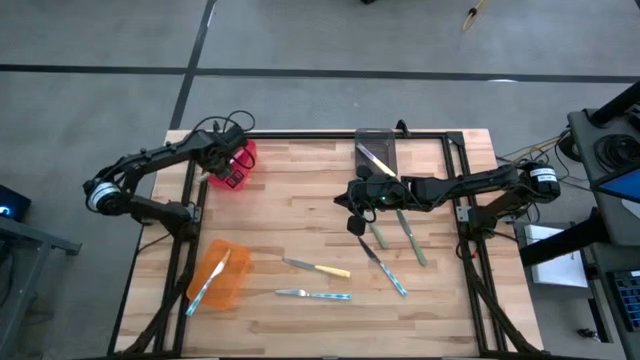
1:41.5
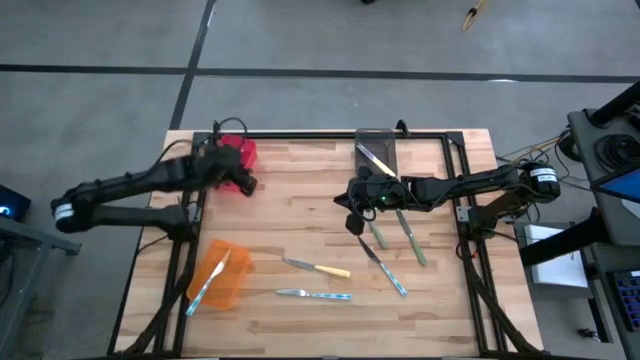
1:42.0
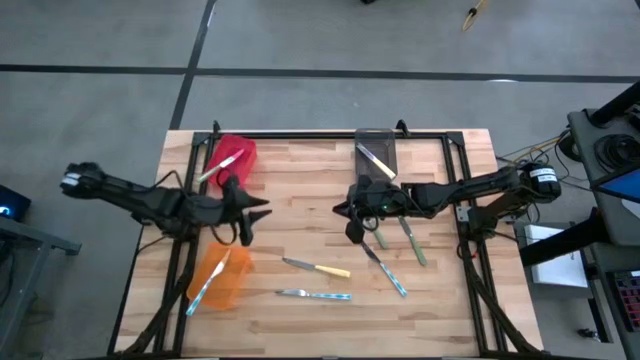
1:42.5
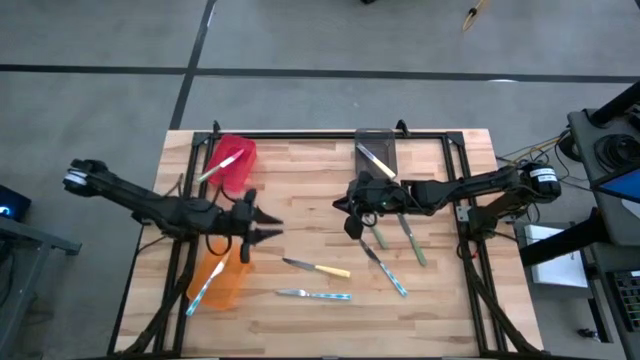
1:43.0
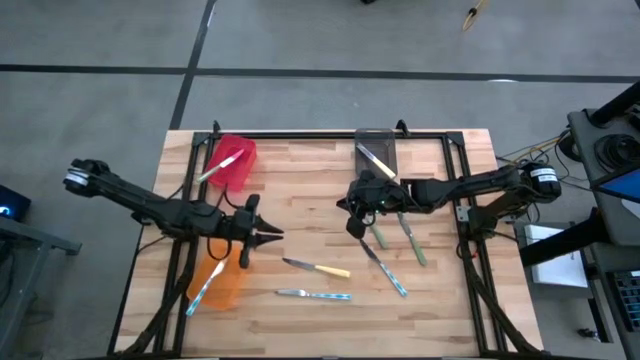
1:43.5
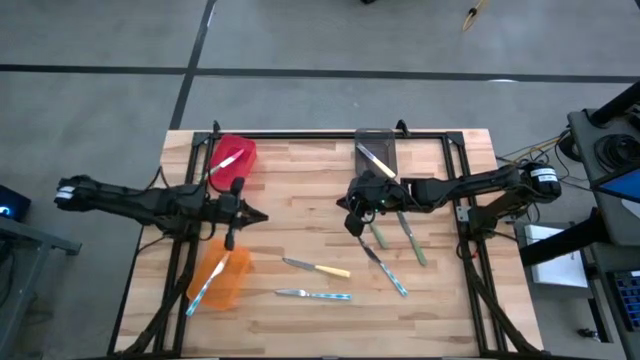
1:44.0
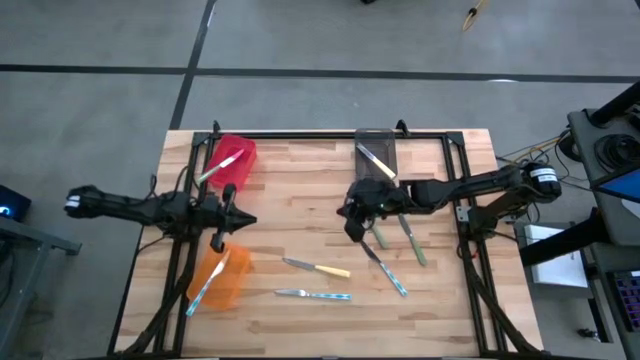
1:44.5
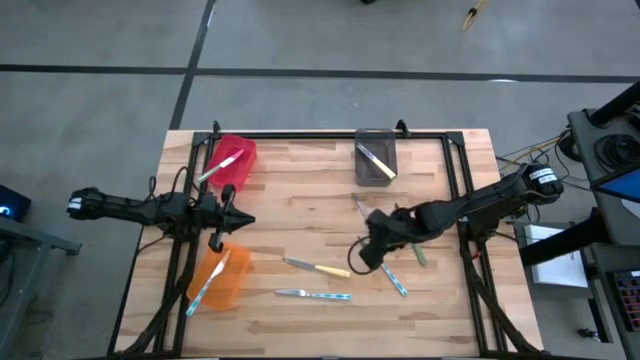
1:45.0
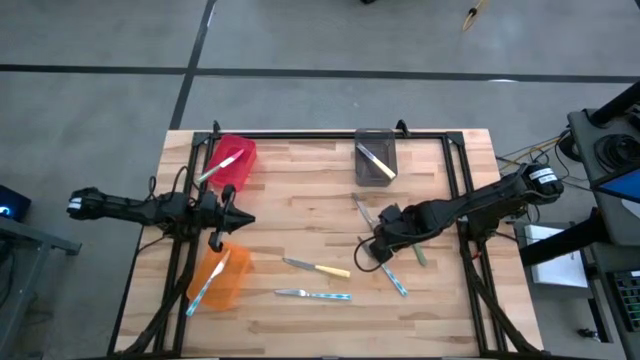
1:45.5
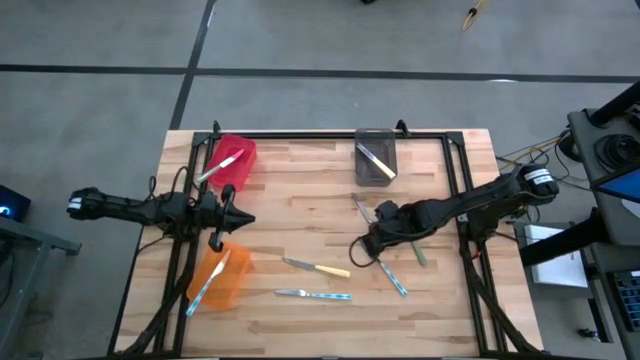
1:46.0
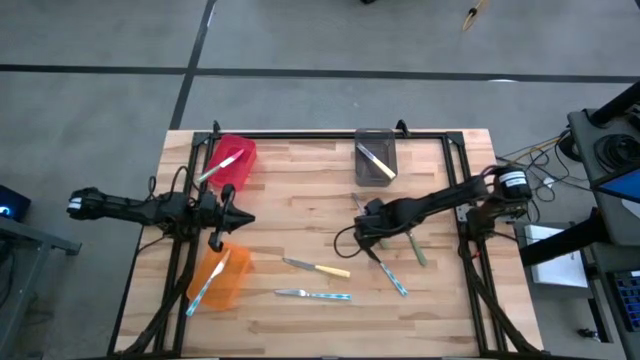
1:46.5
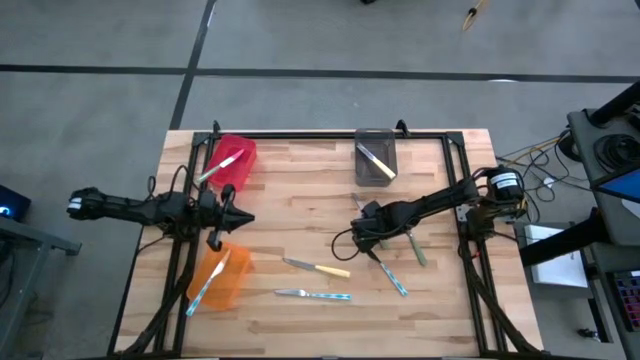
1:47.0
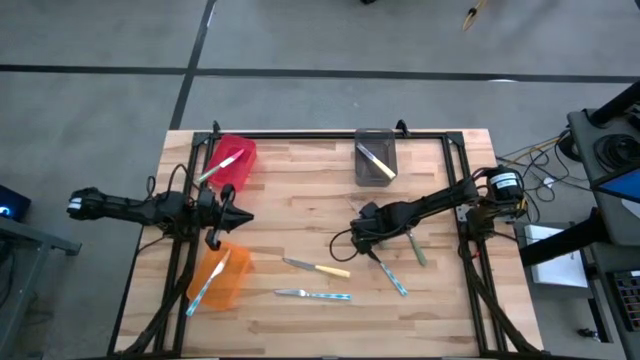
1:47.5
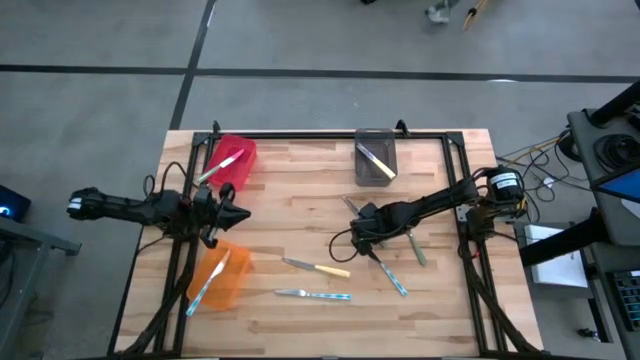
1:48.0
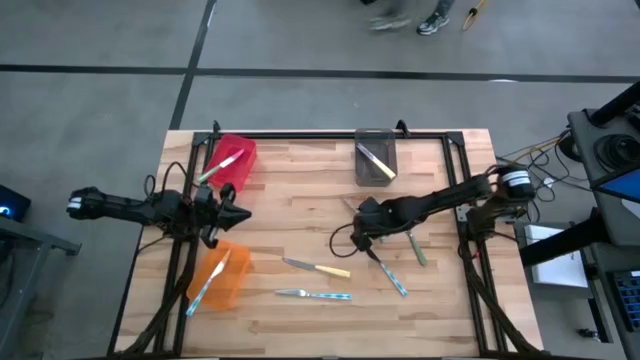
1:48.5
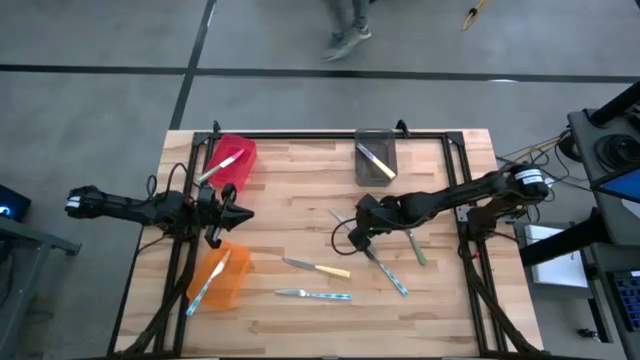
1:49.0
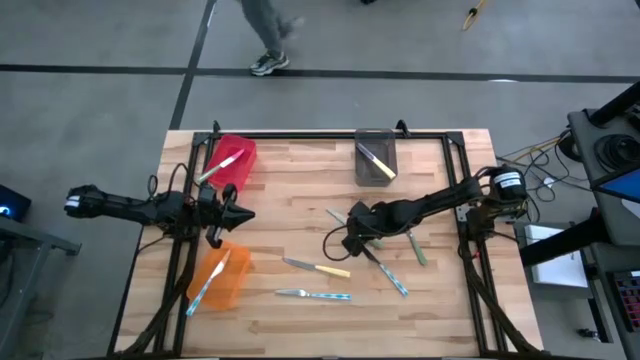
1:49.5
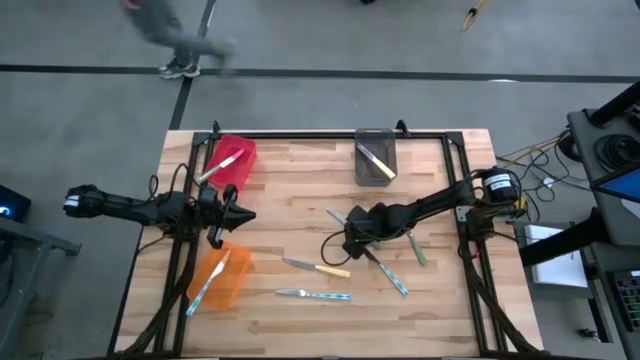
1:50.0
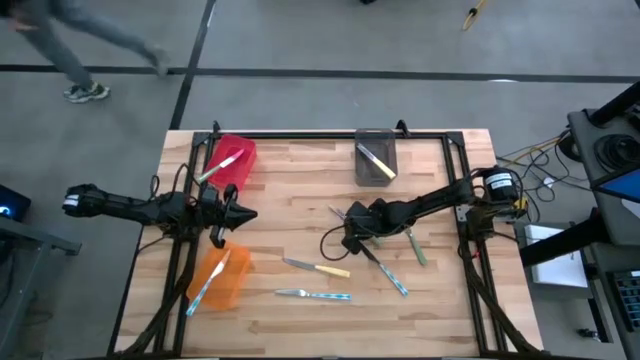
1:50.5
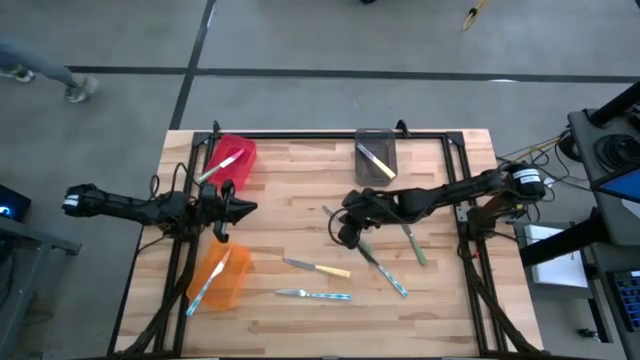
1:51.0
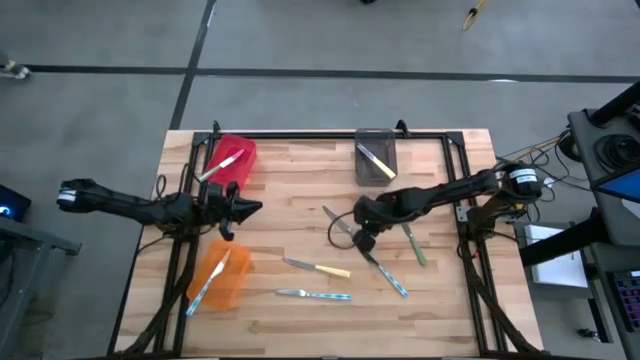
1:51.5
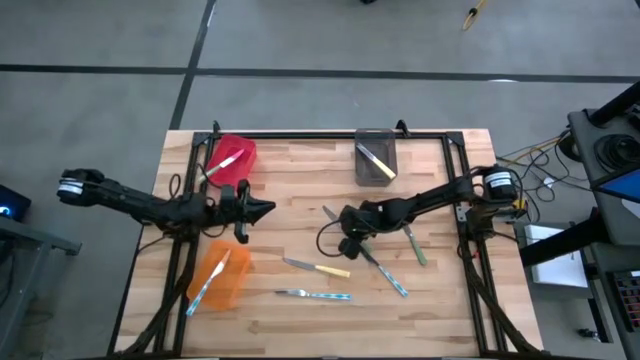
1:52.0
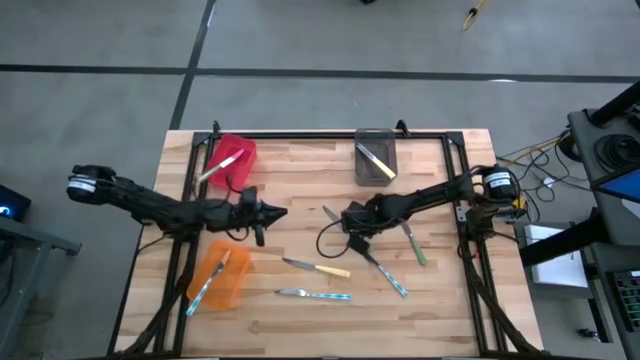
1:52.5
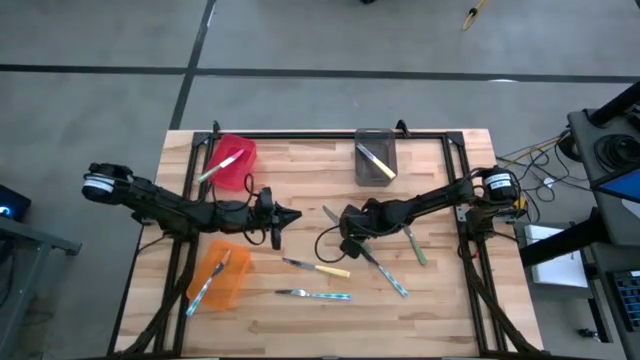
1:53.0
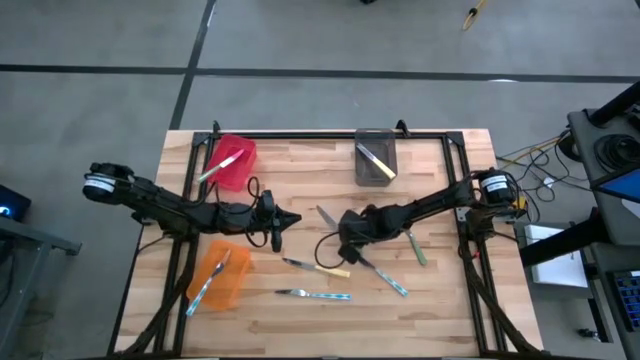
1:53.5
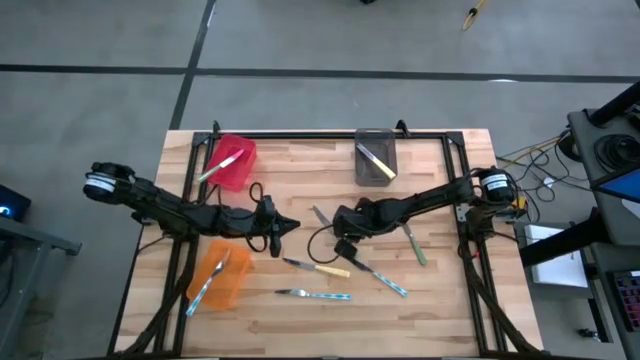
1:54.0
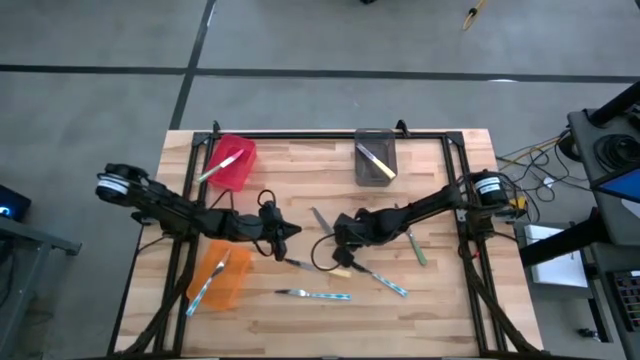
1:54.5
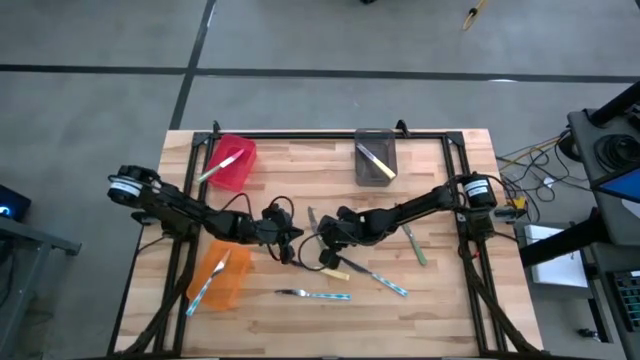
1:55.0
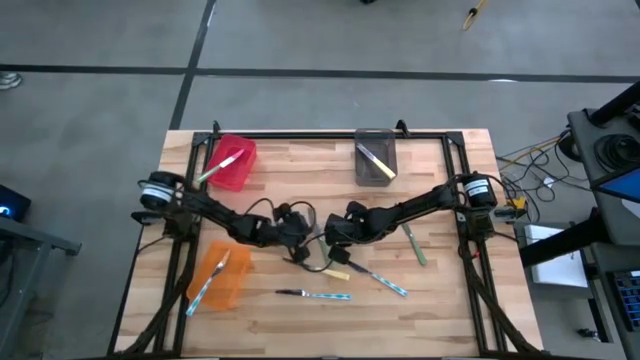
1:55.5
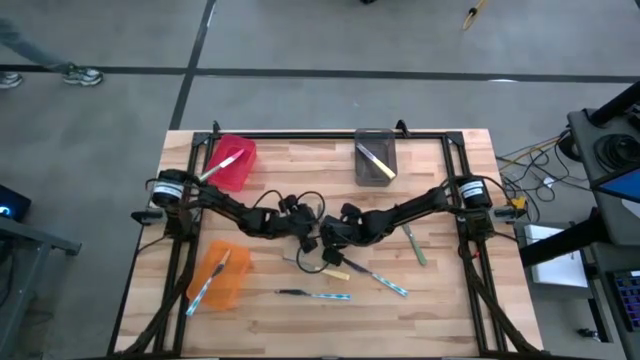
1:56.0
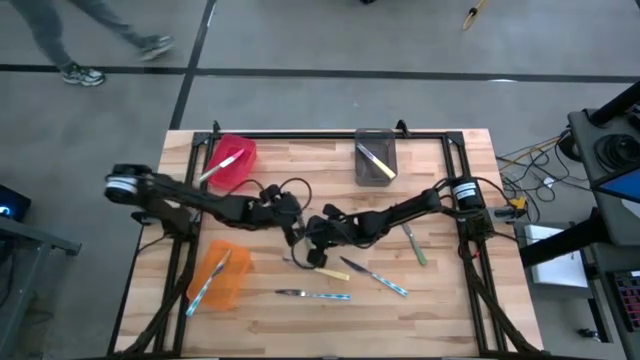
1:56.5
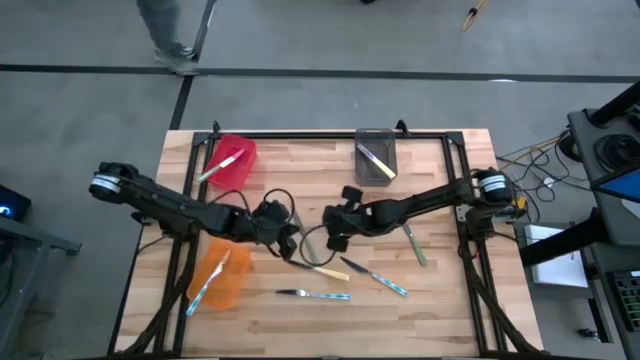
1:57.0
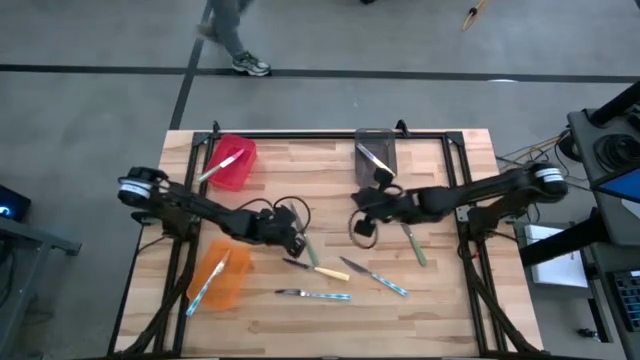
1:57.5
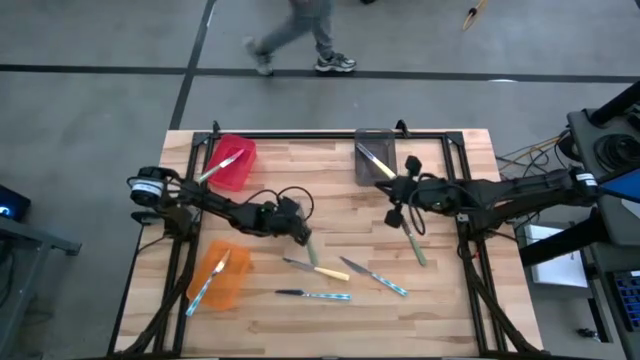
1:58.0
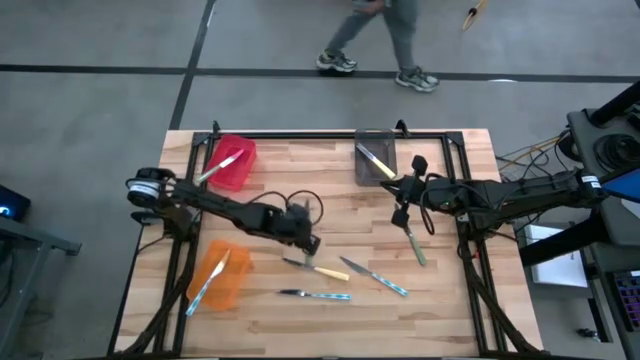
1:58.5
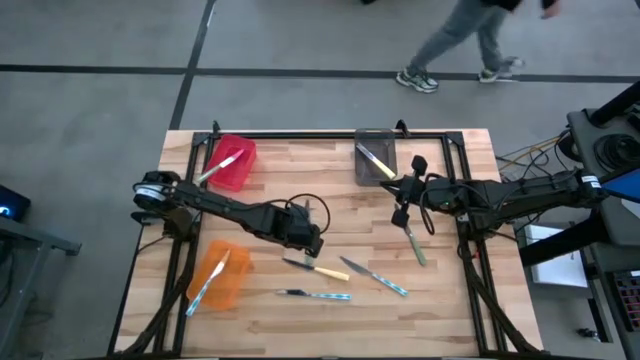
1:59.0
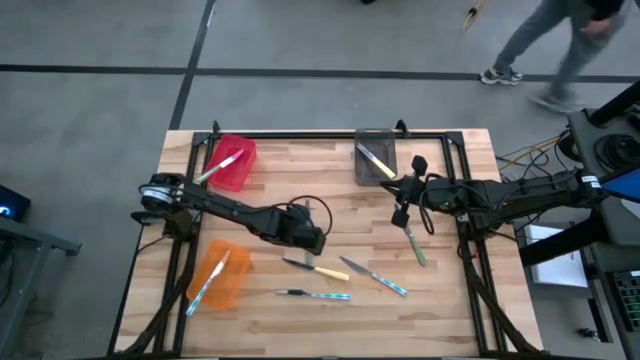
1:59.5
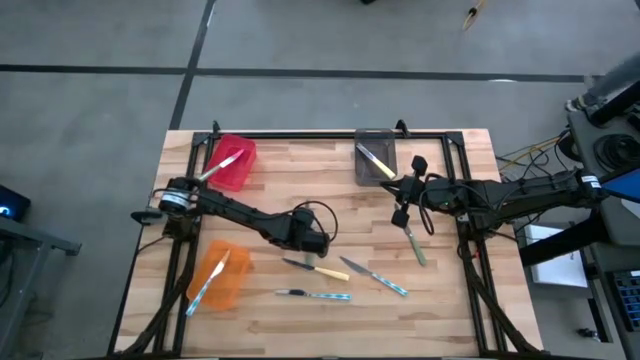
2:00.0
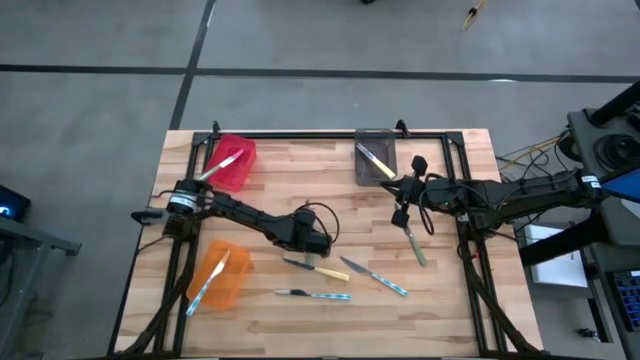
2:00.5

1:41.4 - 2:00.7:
Task: Sort silverware by color (type)
Put the left green knife into the red bin

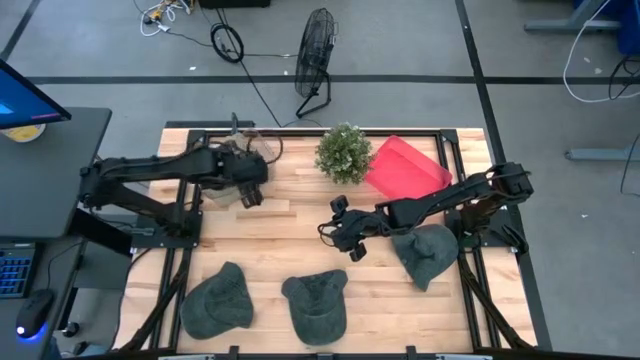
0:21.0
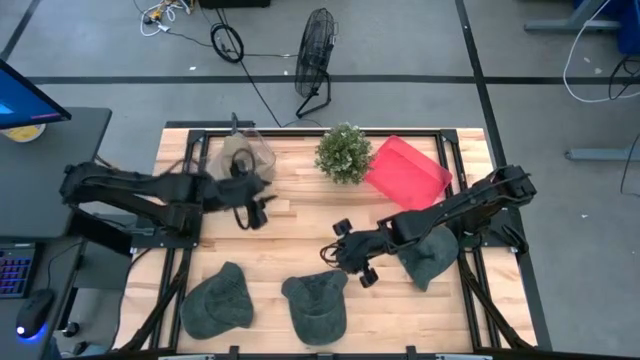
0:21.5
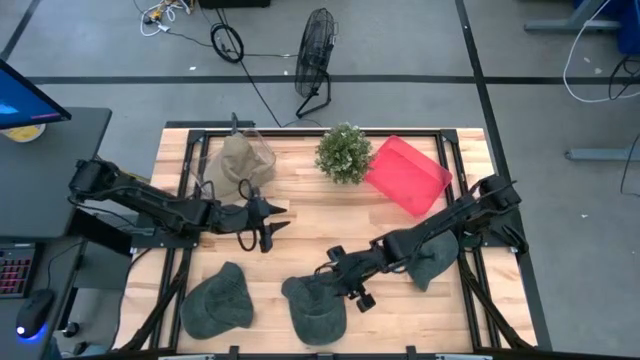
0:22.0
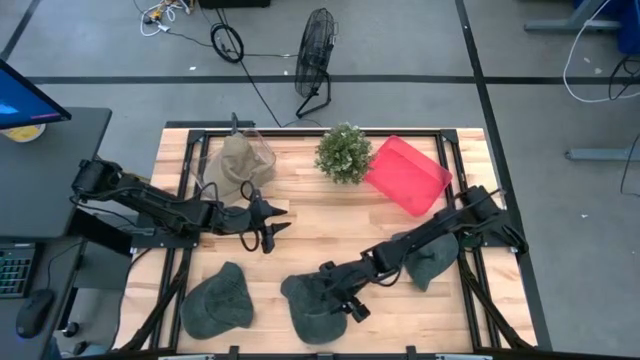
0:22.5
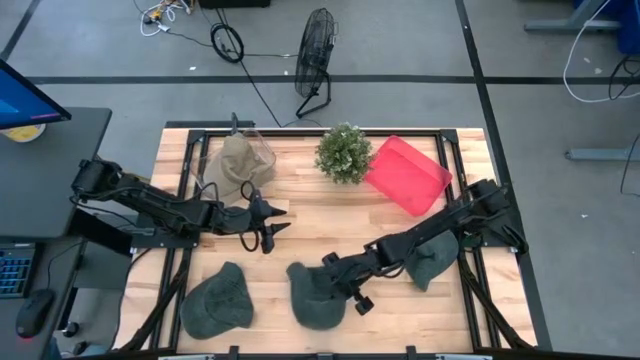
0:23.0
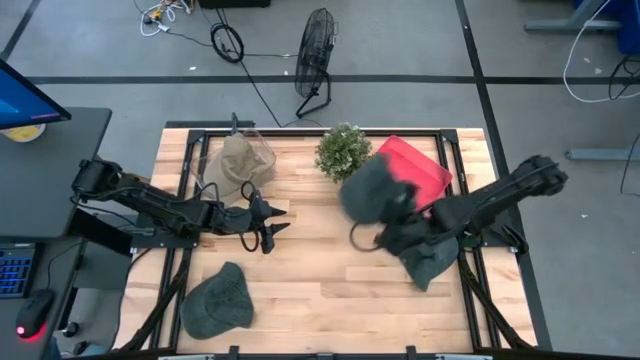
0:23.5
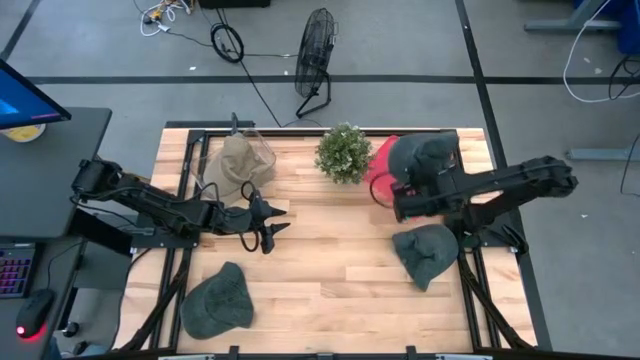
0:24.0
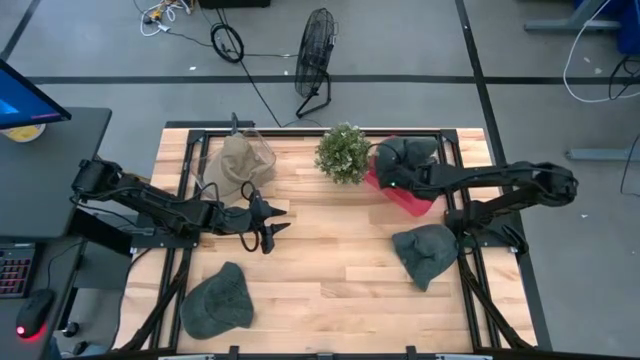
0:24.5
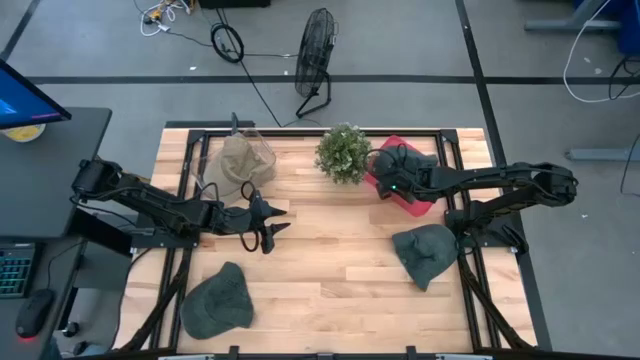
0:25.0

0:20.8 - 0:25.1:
Task: Pick & Place hat
Put the middle black cap into the red bin
